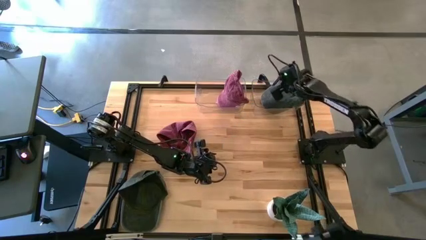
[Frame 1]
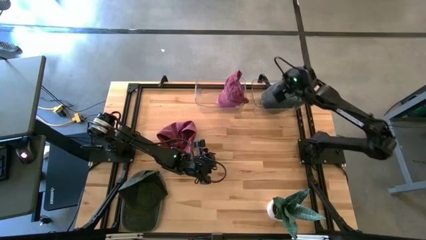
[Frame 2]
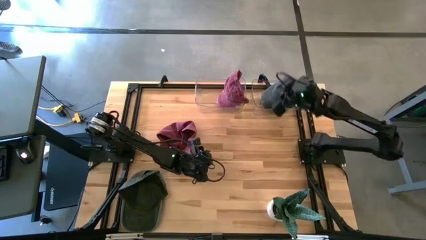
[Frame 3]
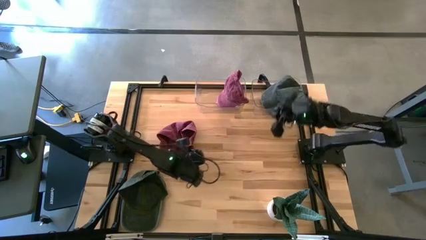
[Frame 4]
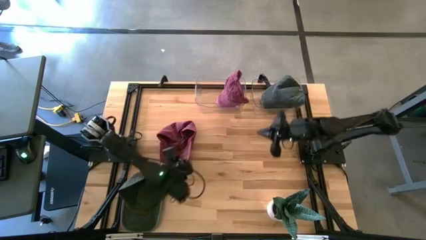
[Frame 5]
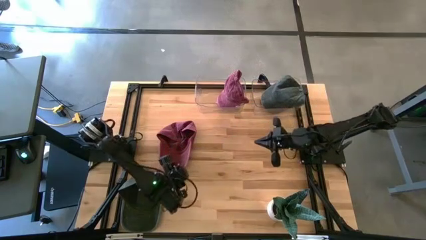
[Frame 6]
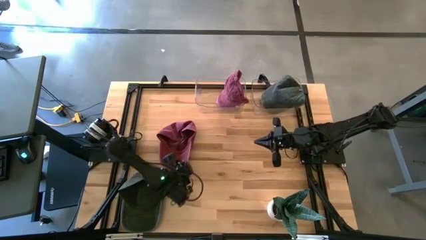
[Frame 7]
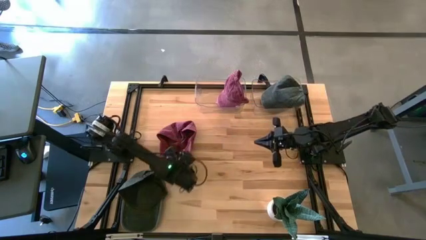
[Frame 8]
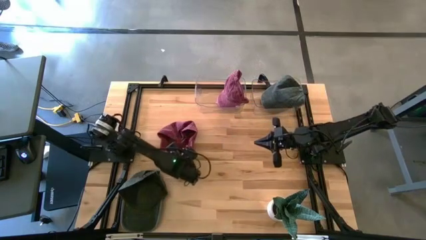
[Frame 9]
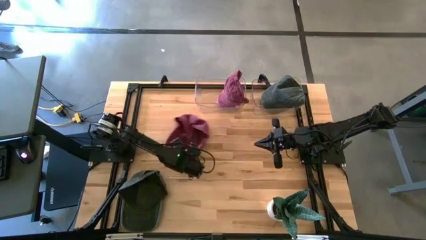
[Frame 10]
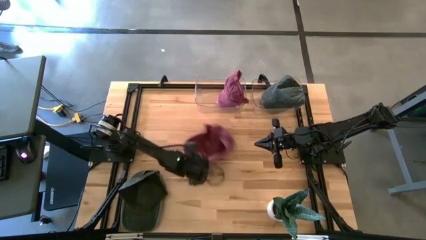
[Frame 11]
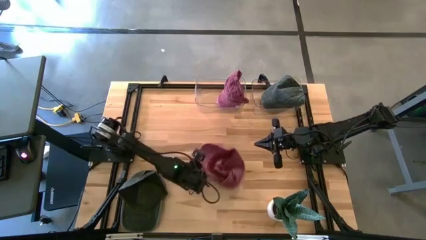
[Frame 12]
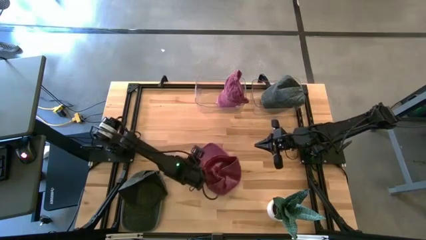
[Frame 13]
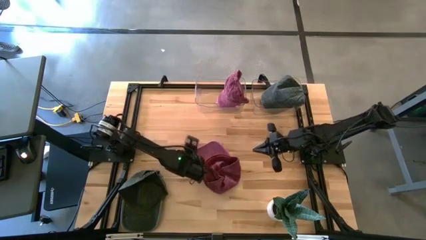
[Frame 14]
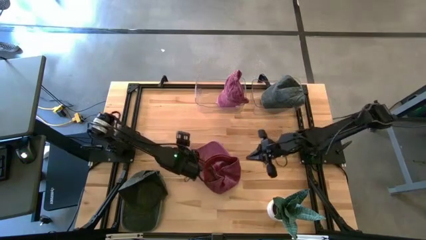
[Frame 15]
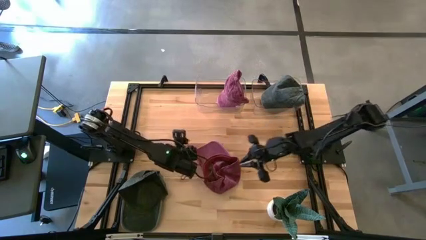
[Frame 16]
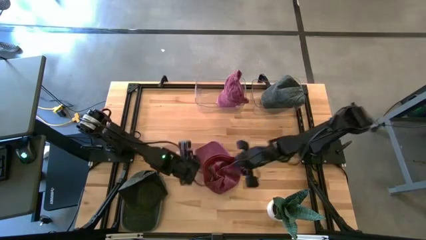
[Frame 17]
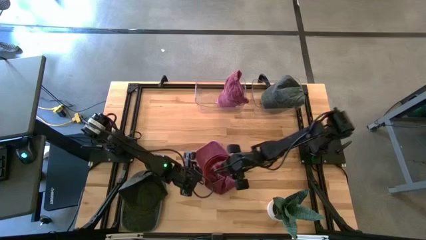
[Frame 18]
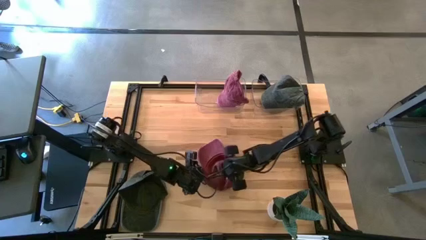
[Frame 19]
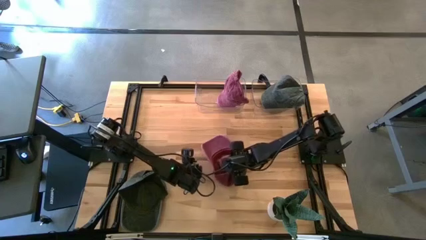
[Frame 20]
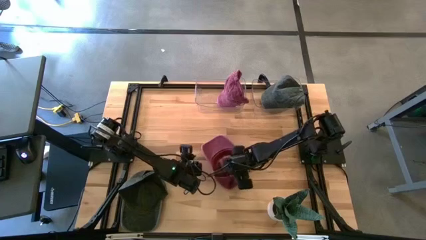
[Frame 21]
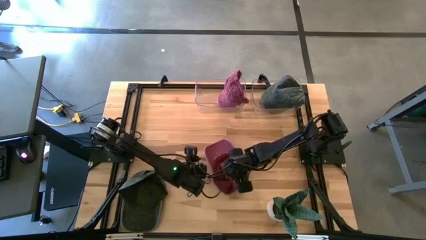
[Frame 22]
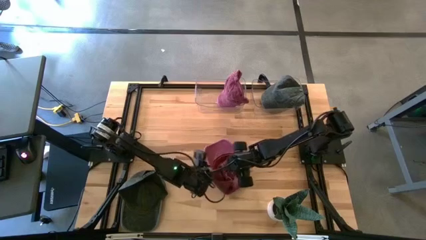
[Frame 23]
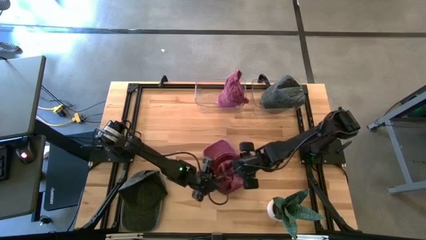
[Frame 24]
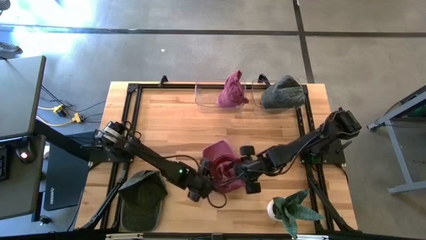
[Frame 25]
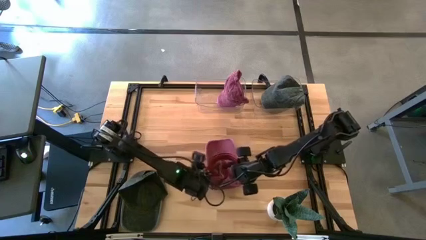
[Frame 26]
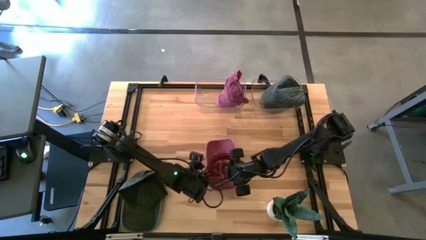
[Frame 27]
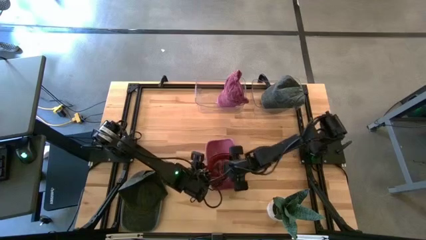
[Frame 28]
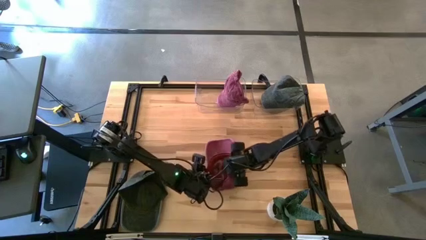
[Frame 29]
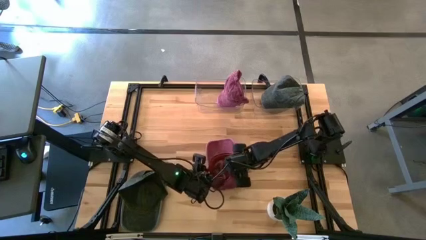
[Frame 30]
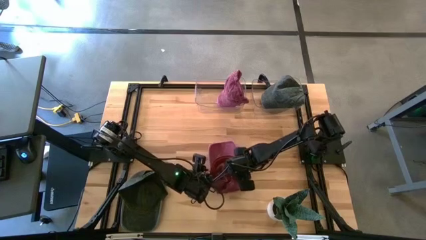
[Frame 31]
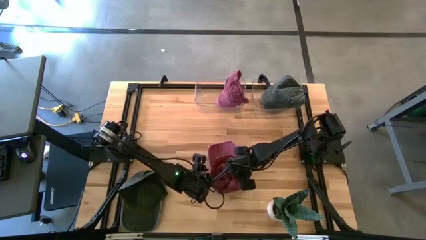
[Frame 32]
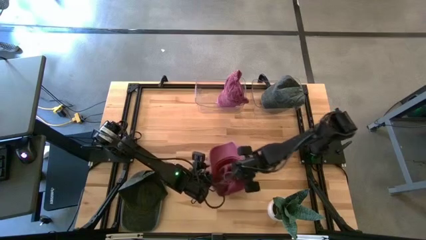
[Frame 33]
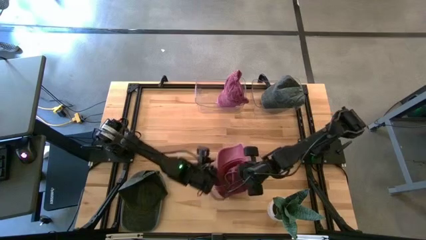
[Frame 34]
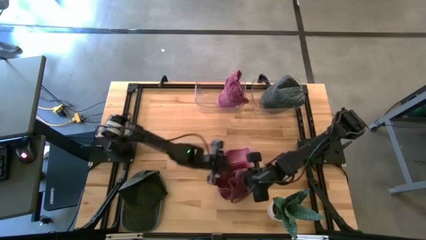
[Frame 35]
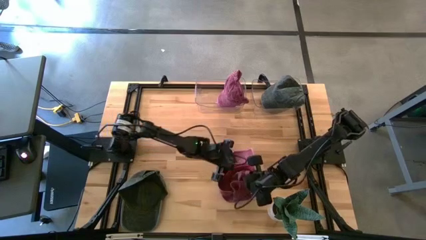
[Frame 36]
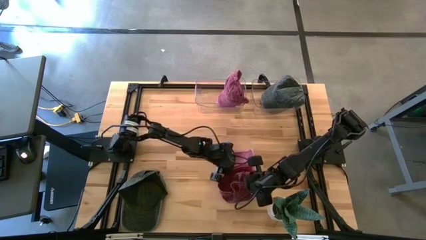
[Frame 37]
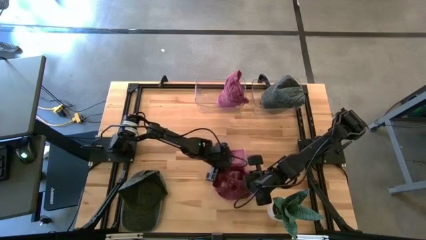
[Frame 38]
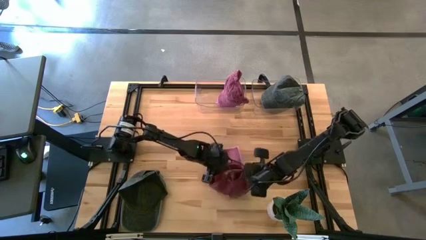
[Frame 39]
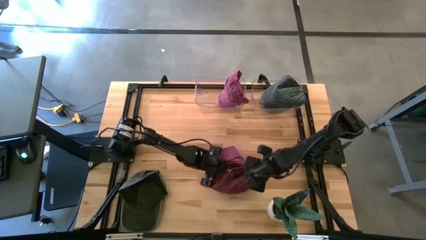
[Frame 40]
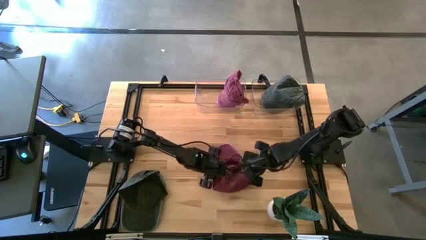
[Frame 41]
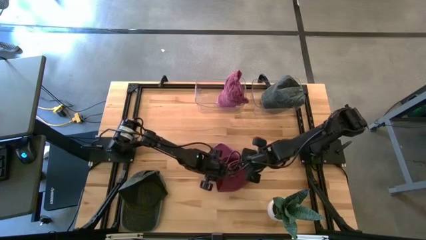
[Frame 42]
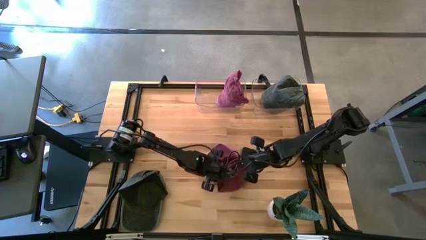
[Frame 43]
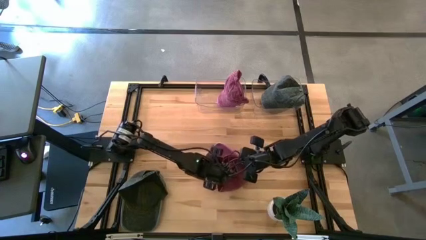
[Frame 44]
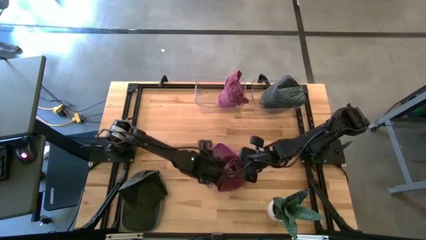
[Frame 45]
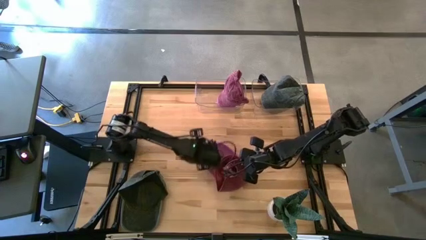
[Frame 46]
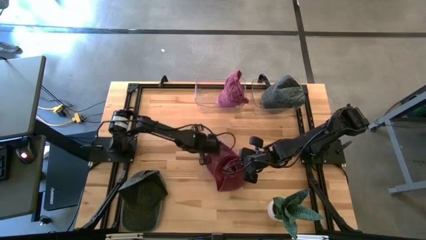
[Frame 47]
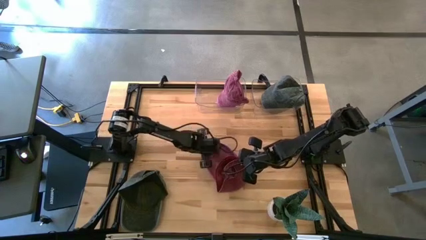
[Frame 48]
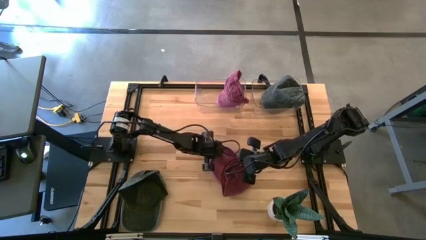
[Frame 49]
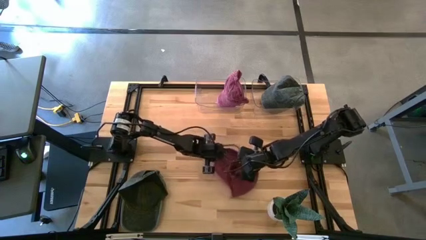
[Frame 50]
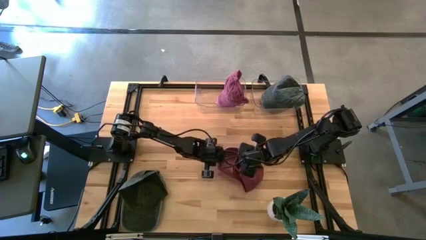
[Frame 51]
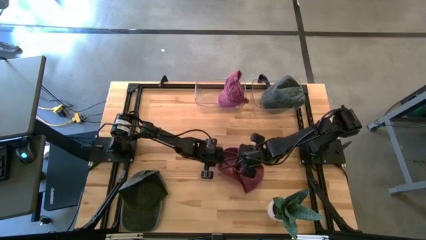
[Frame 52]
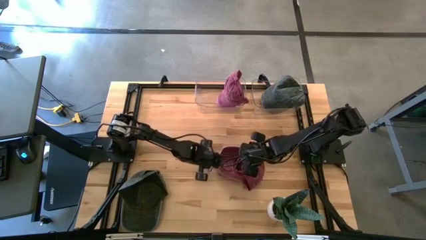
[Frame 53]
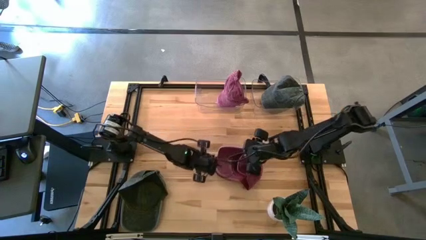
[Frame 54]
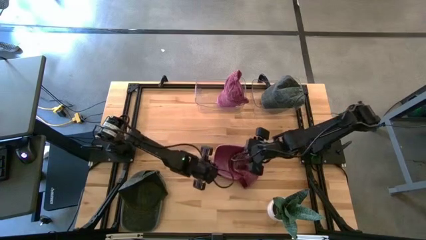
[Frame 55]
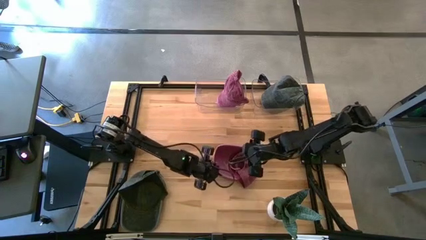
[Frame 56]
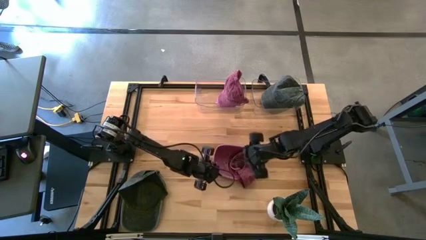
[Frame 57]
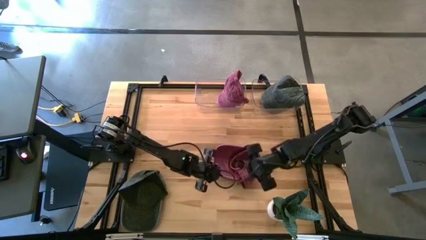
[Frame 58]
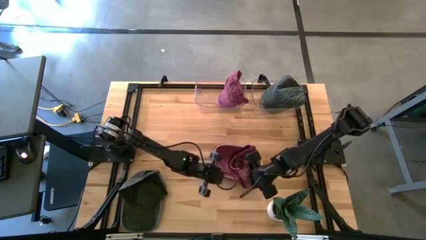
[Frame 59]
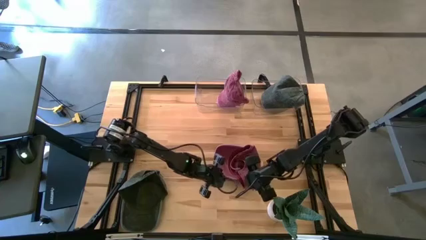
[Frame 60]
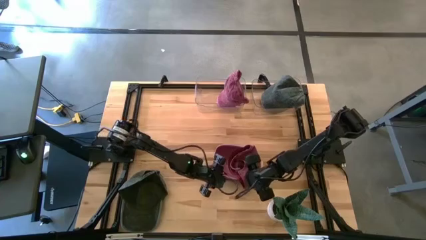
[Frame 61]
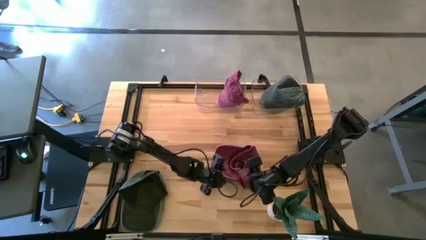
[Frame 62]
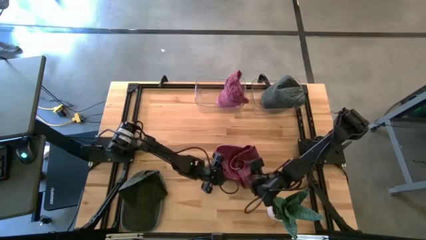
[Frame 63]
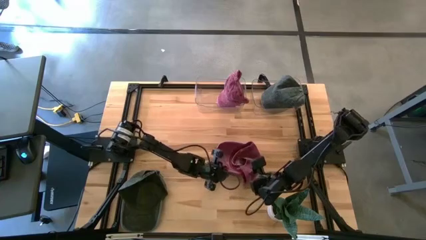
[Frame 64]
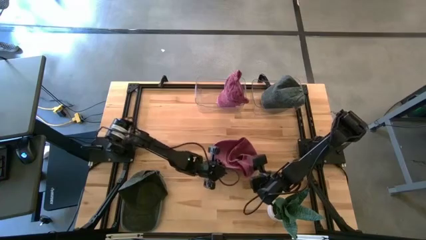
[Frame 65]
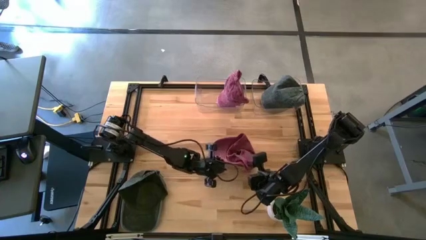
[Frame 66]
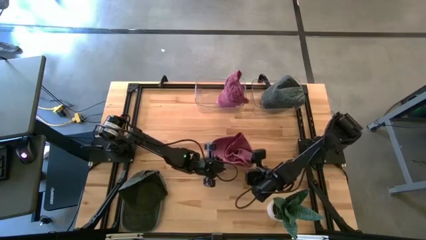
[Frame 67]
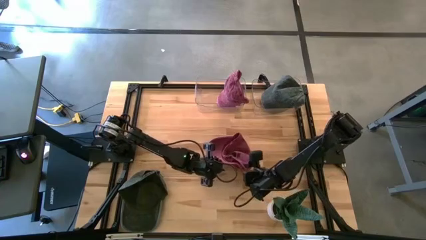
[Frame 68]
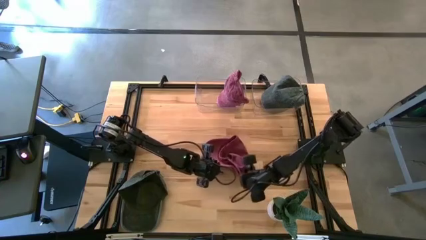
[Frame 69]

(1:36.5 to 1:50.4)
Task: Pick & Place hat
Put the red cap into the left transparent bin
